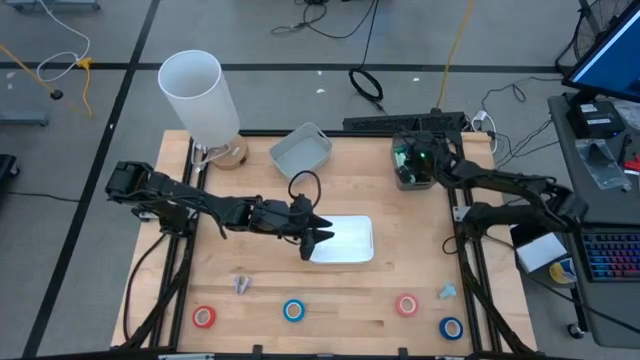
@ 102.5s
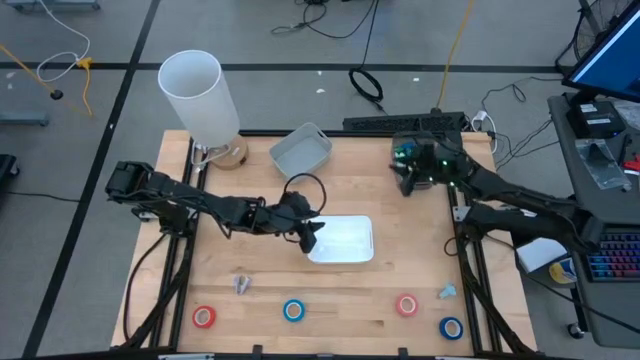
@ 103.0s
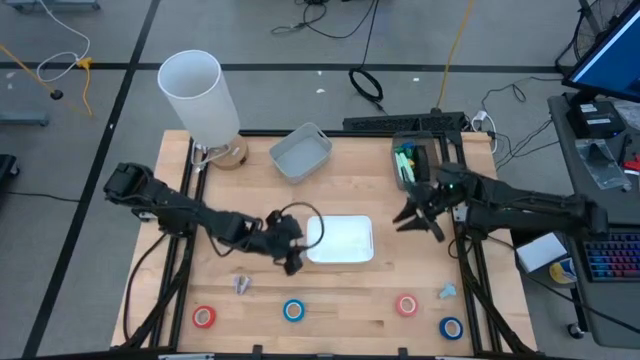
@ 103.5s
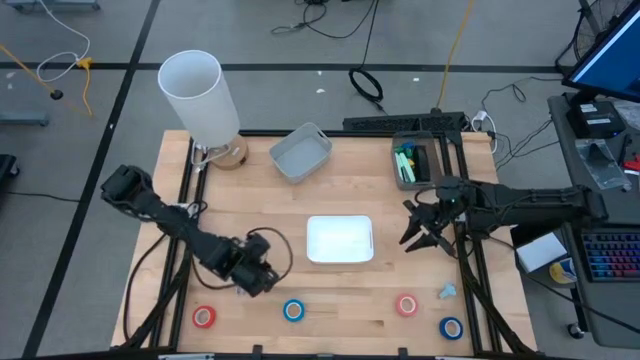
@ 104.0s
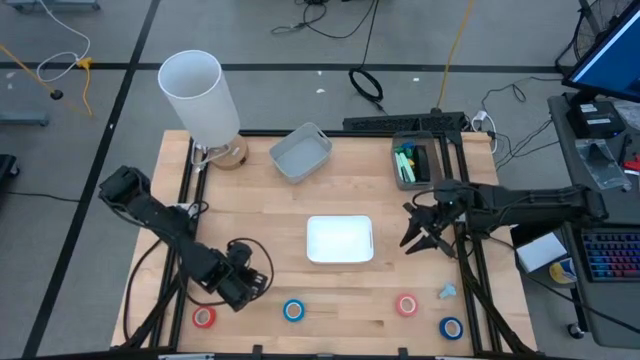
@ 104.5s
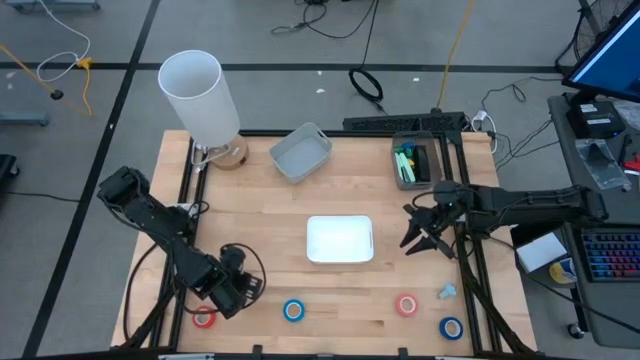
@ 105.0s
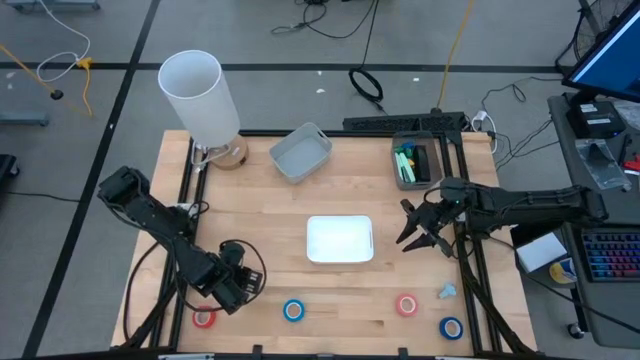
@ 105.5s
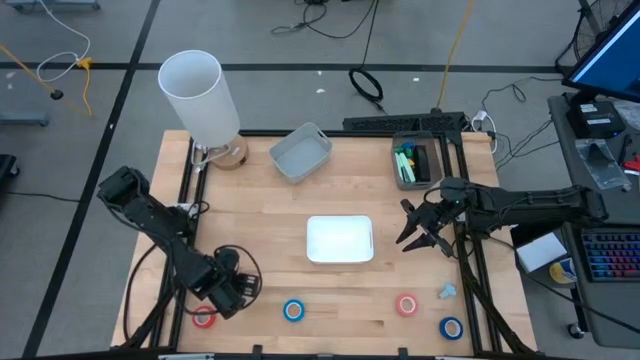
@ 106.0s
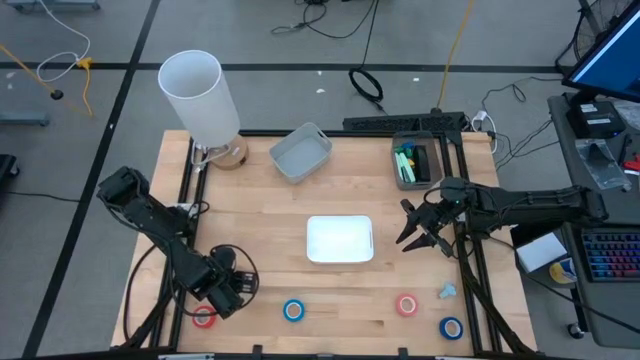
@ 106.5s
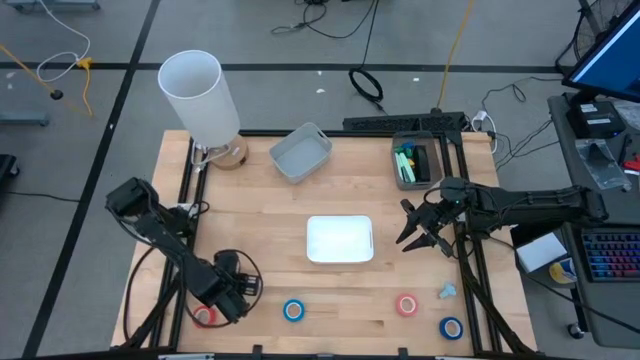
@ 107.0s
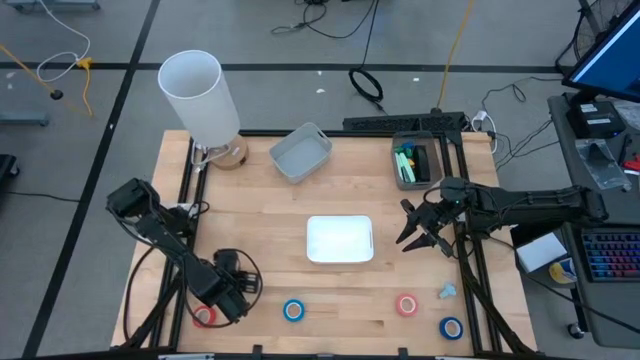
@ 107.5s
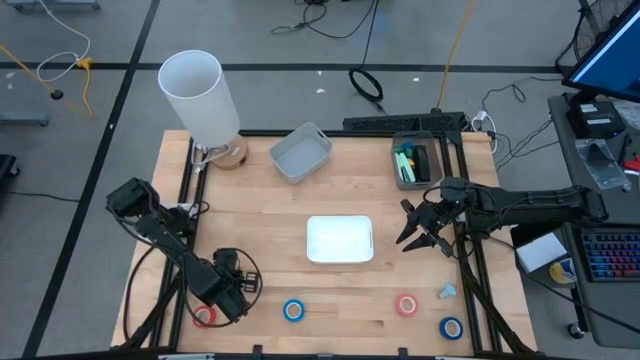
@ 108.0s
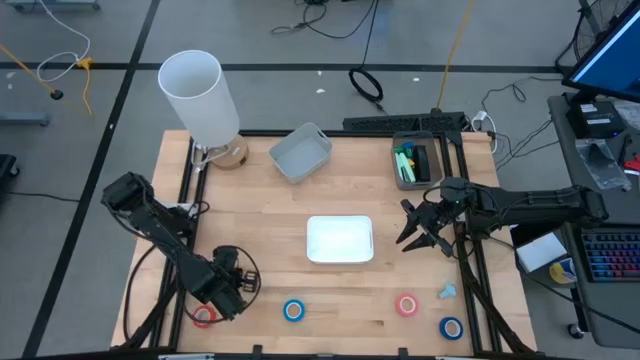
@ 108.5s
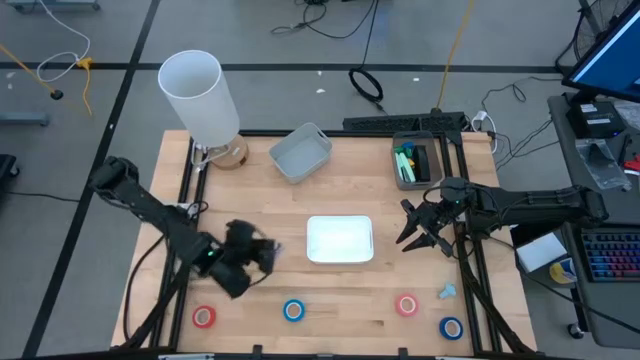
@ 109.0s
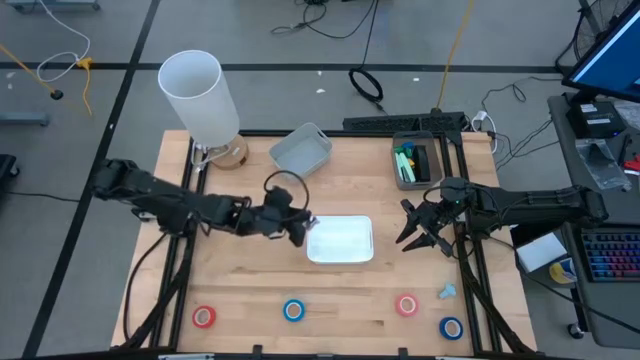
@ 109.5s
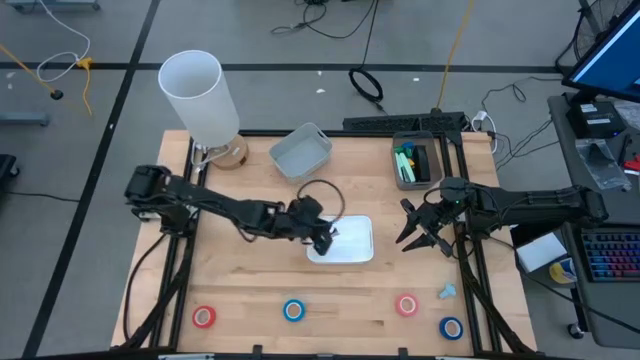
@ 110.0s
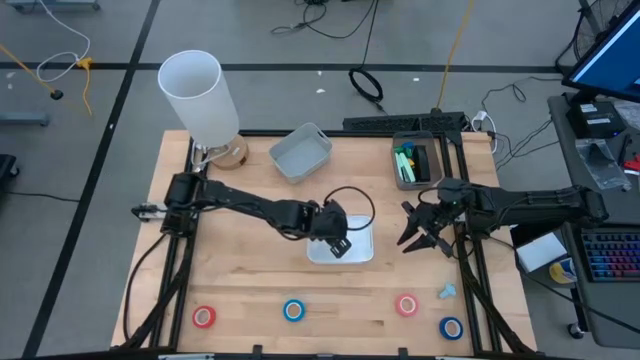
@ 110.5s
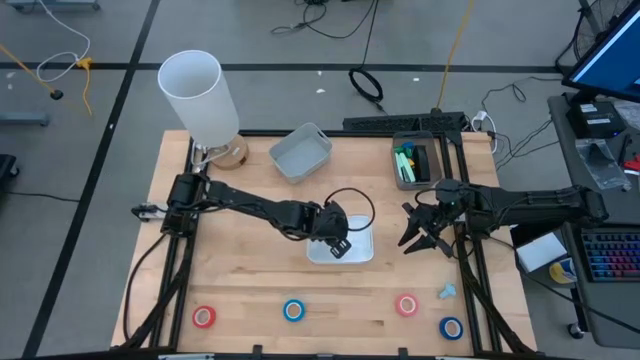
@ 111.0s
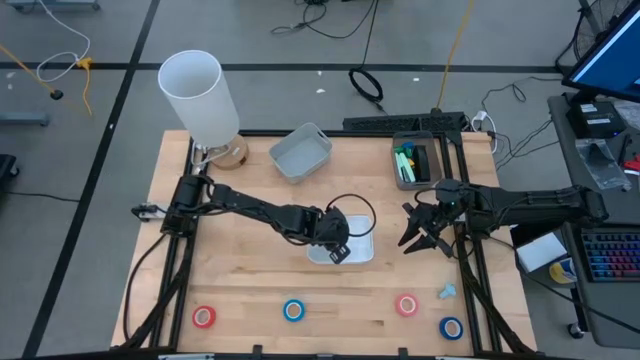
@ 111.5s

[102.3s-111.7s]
Task: Pick and place Stapler, Stapler remover, tape
Put the purple staple remover into the white bin

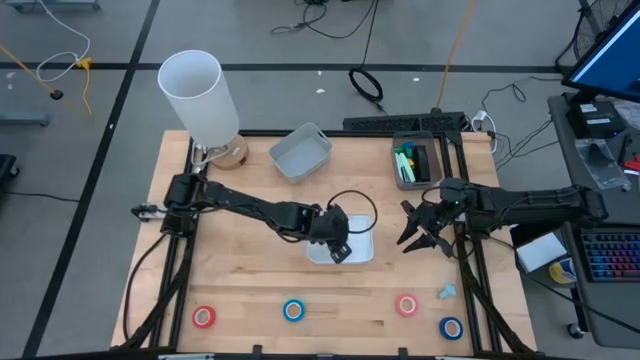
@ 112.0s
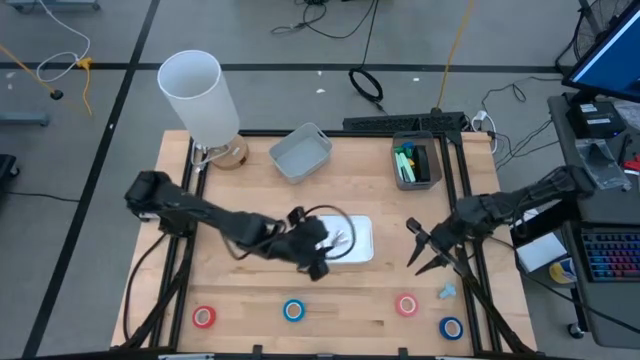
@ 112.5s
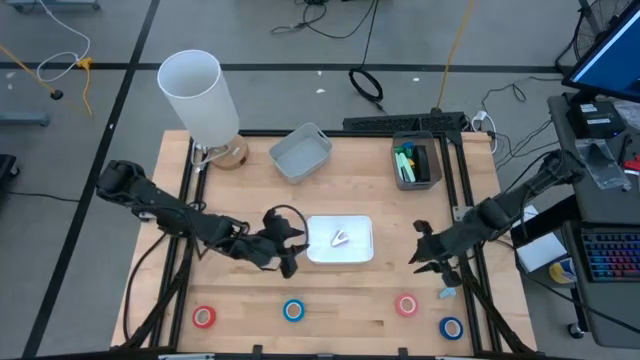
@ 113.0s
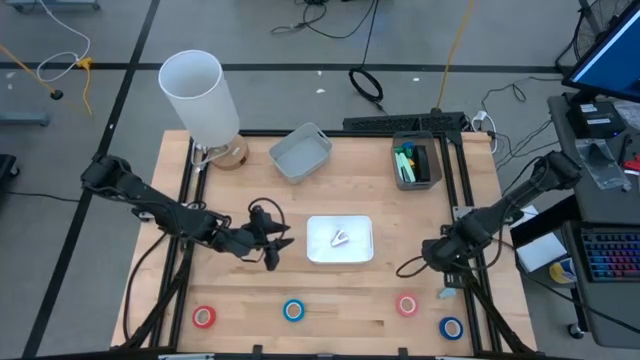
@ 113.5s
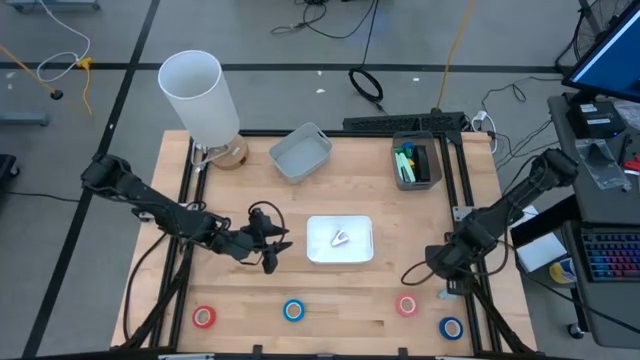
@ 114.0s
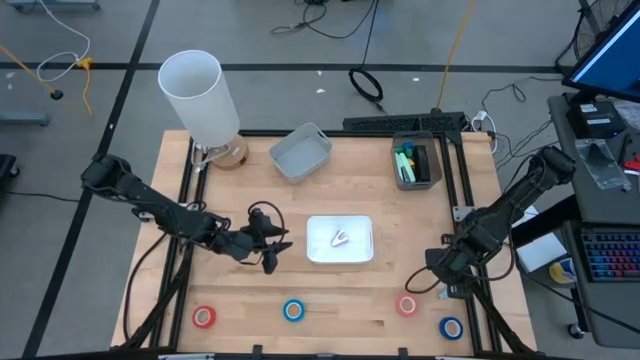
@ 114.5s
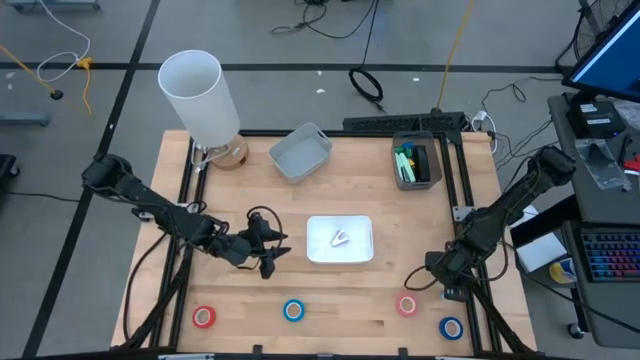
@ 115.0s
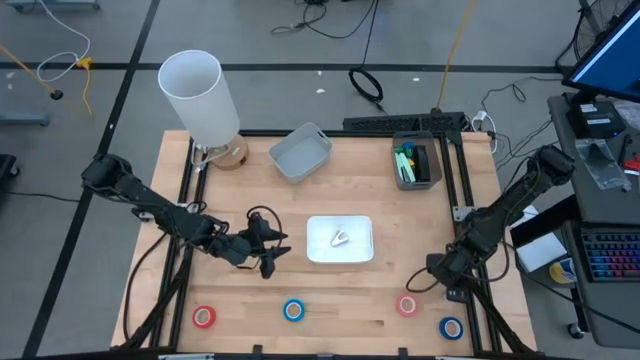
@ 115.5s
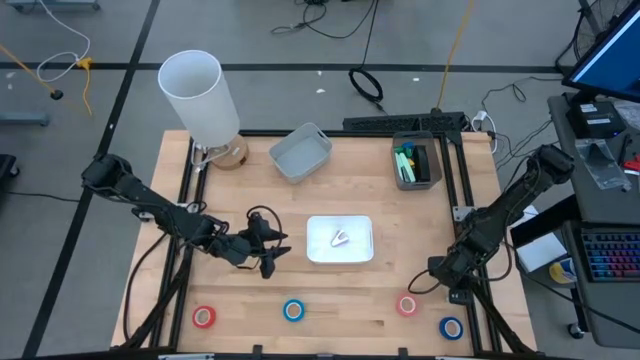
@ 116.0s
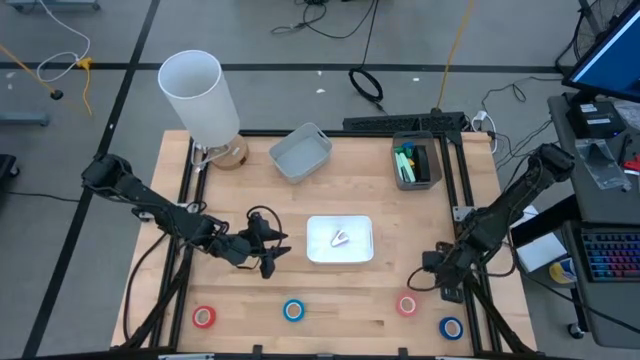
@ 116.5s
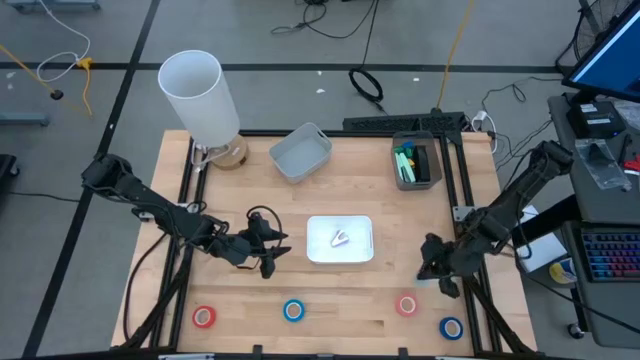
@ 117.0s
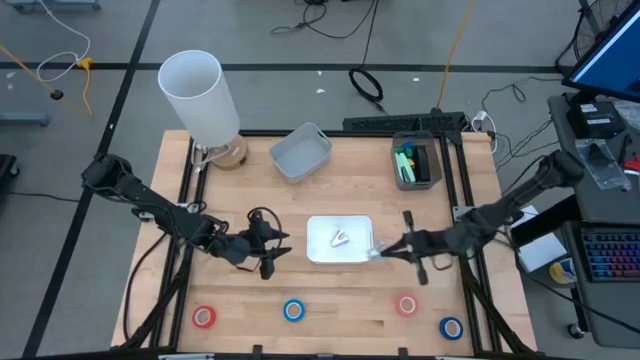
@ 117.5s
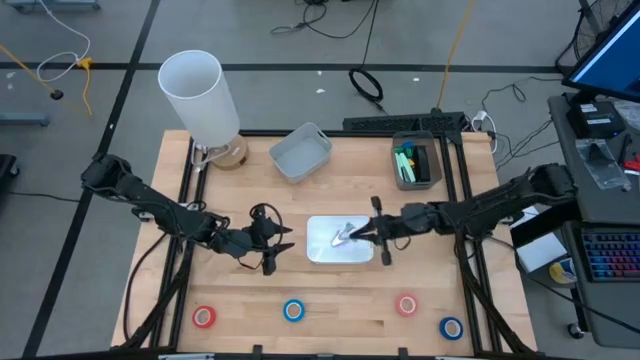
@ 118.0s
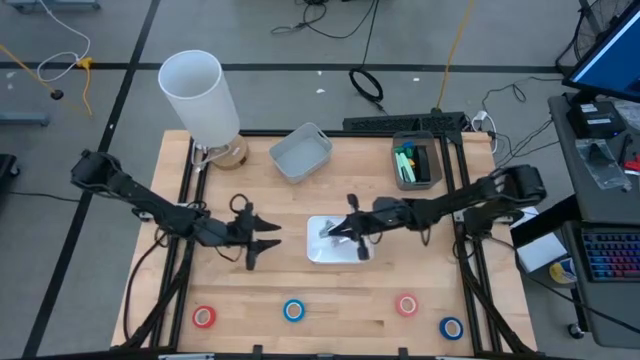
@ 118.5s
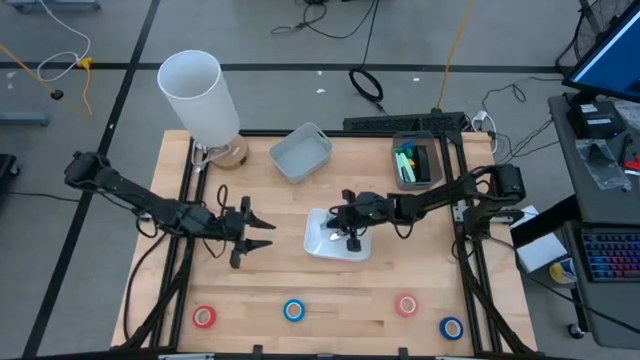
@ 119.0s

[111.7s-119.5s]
Put the gray staple remover into the white bin

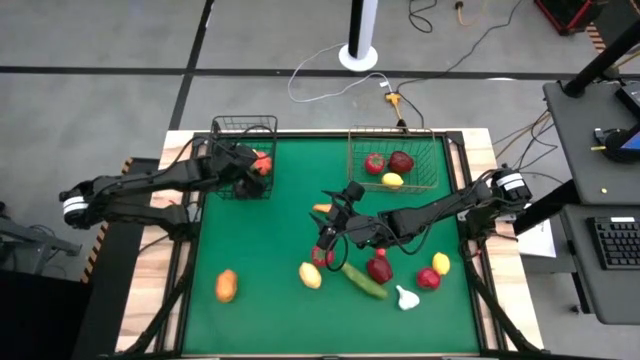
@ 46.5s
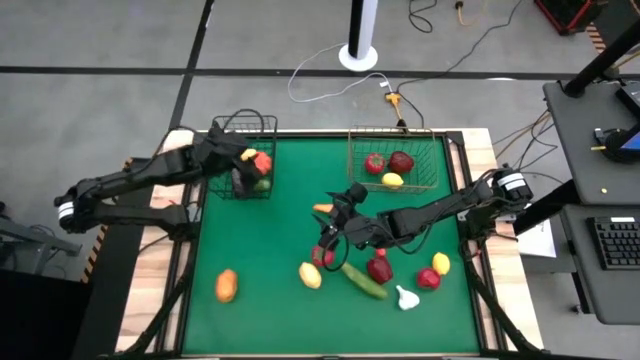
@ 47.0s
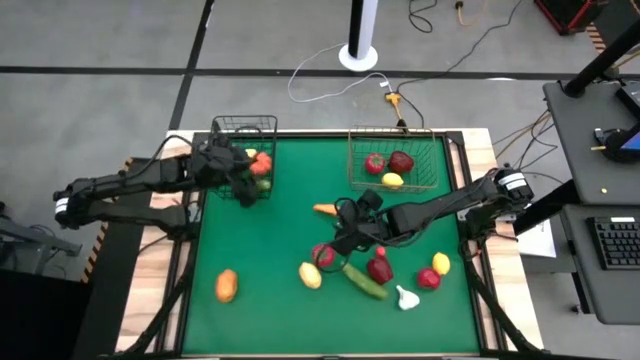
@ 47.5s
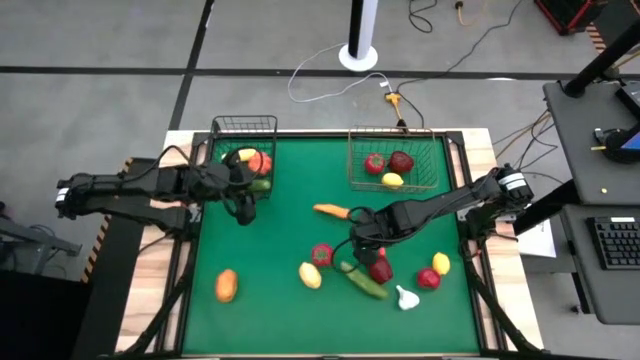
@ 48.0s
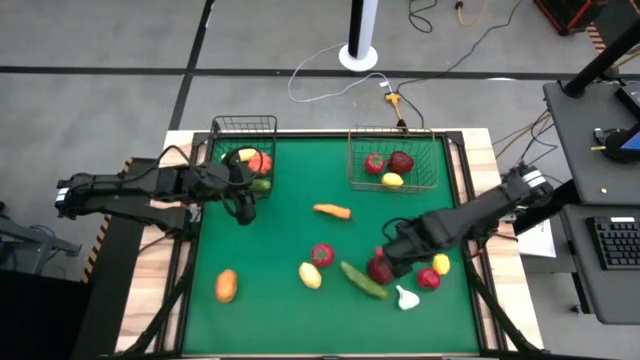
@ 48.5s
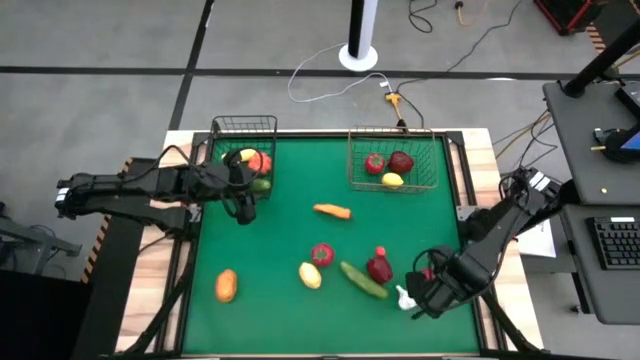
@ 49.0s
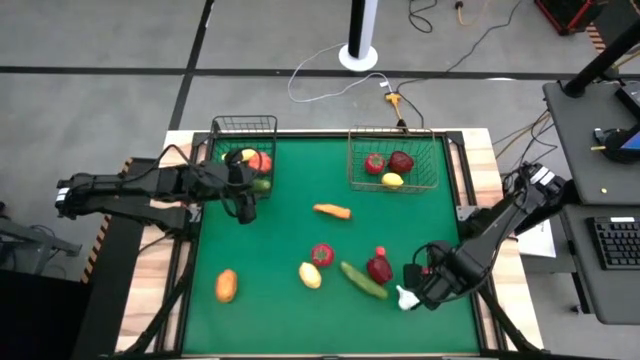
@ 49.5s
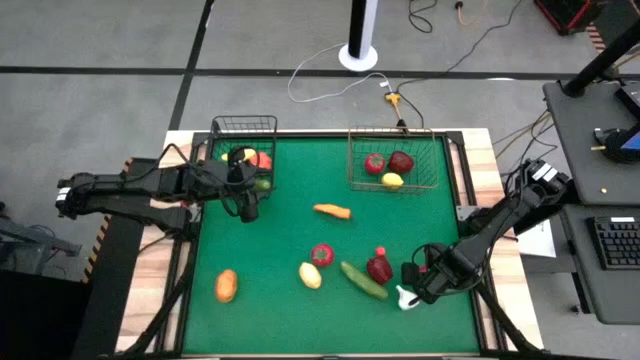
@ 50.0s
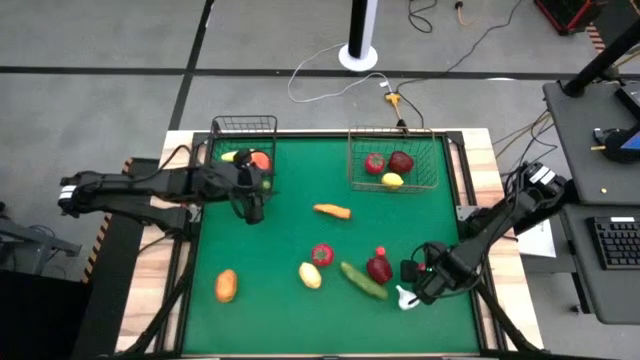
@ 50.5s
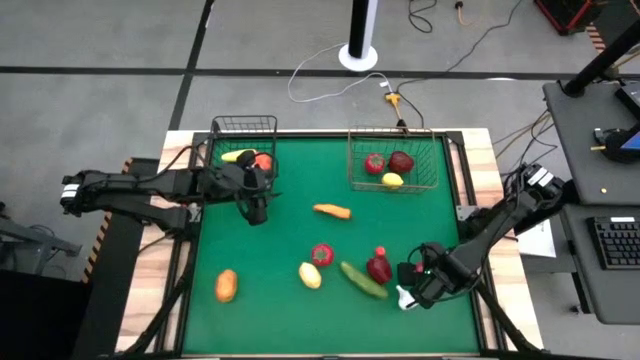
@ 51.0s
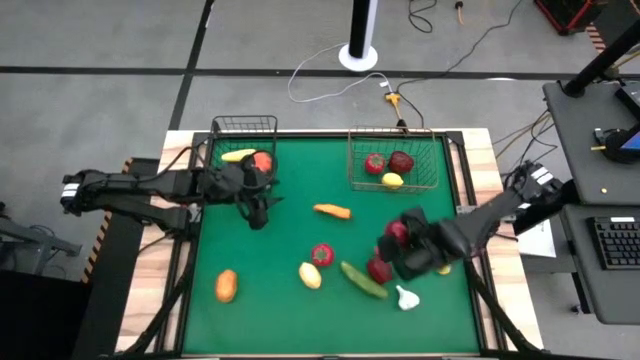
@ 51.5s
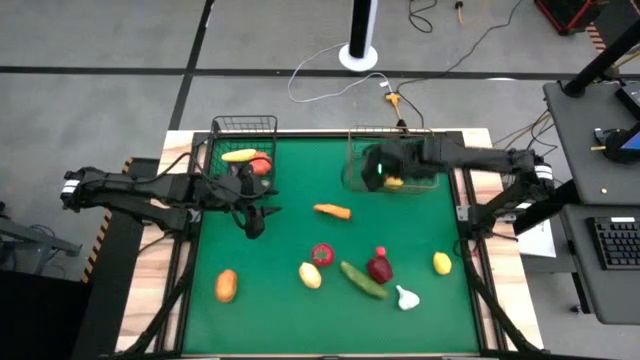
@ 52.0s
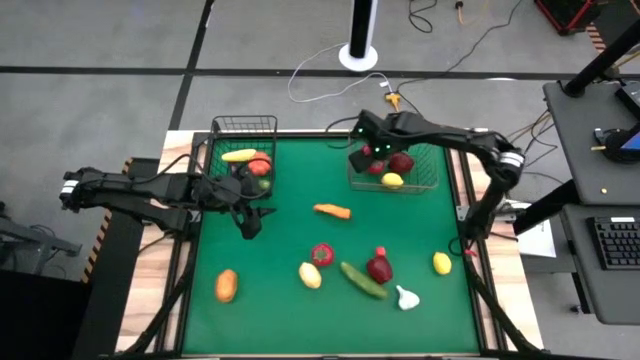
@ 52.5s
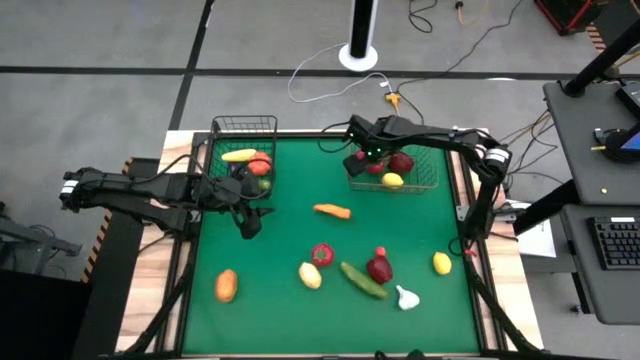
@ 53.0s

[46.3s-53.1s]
Task: Sort produce into baskets
Put the right red tomato into the right wire basket
